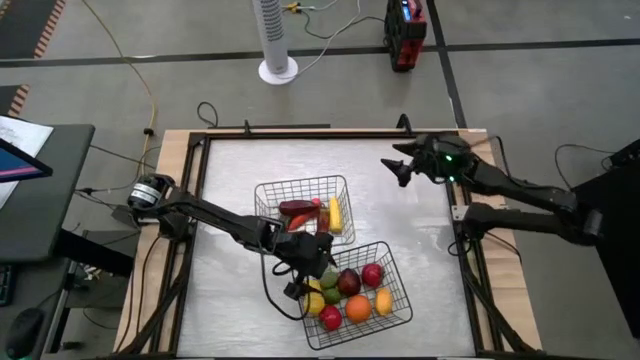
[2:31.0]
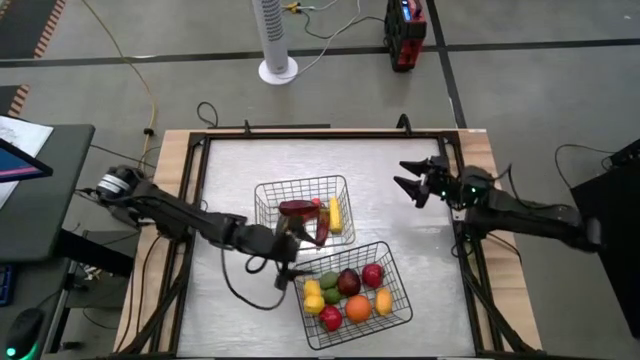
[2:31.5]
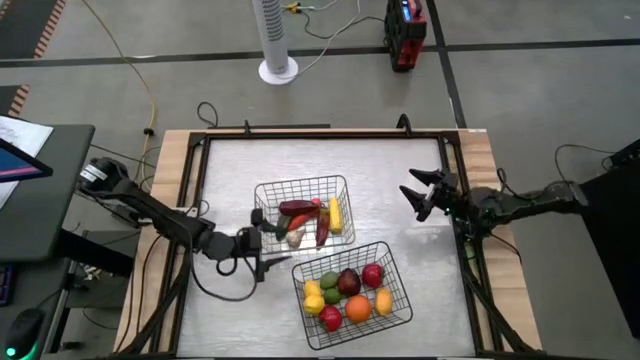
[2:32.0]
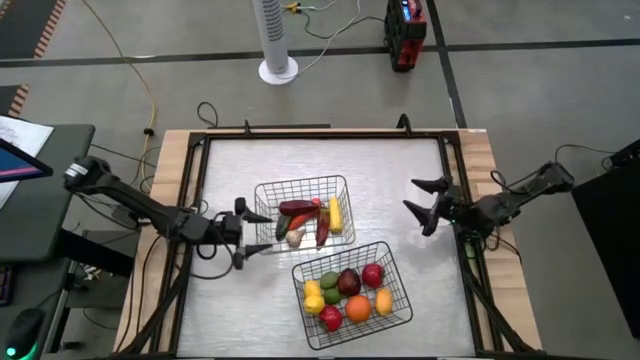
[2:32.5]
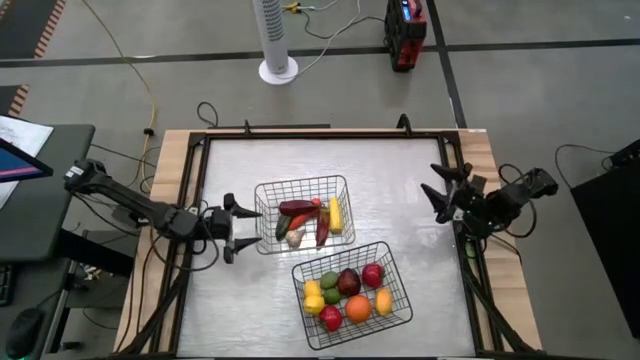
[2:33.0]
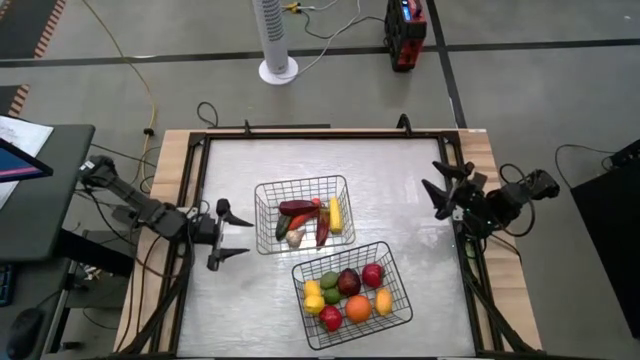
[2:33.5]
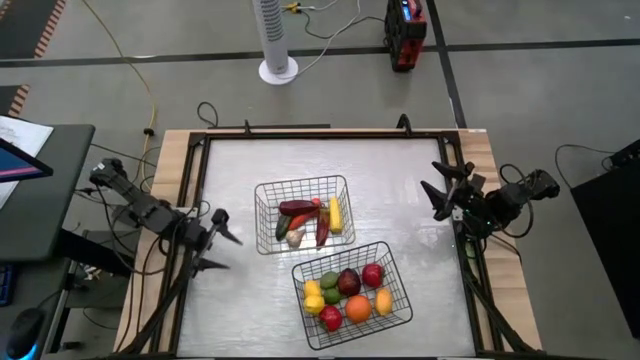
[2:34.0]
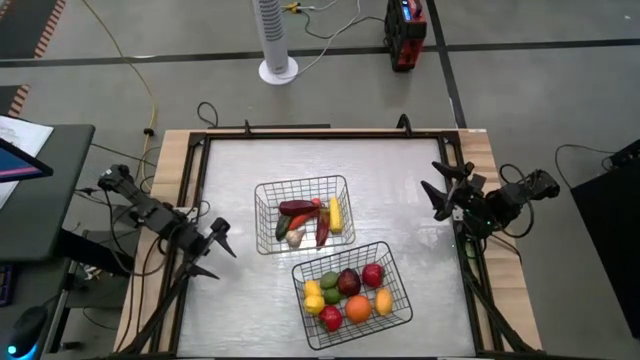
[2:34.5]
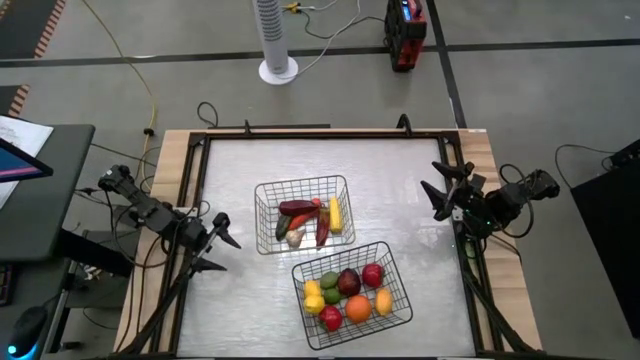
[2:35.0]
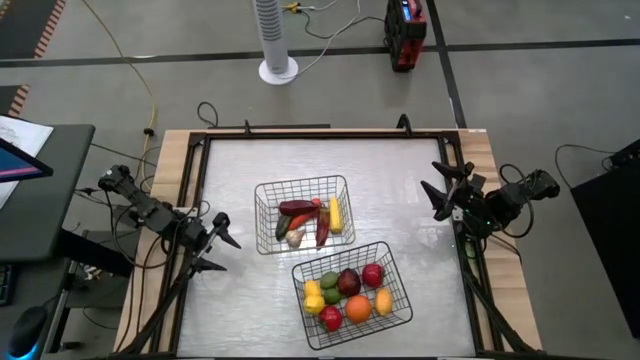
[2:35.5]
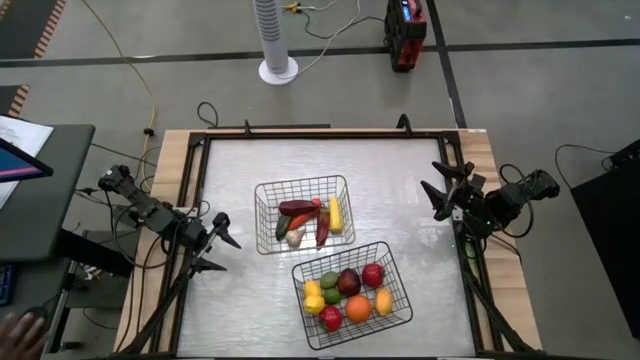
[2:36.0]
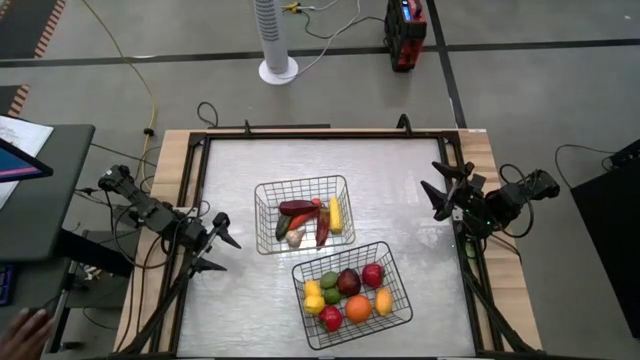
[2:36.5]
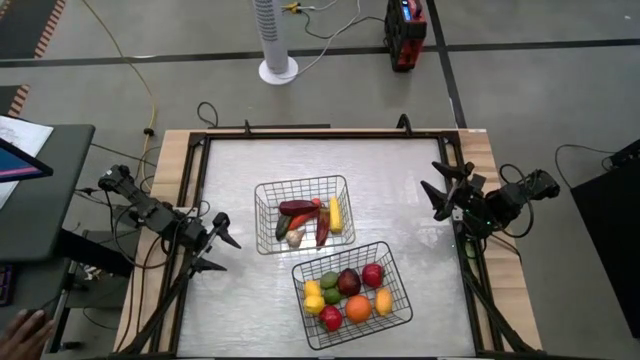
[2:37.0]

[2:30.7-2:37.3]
Task: Sort produce into baskets
Return to Home Position

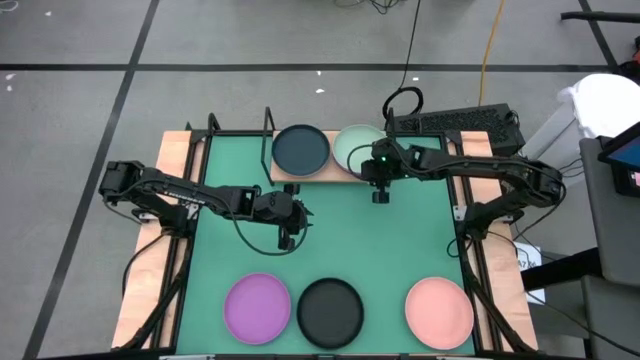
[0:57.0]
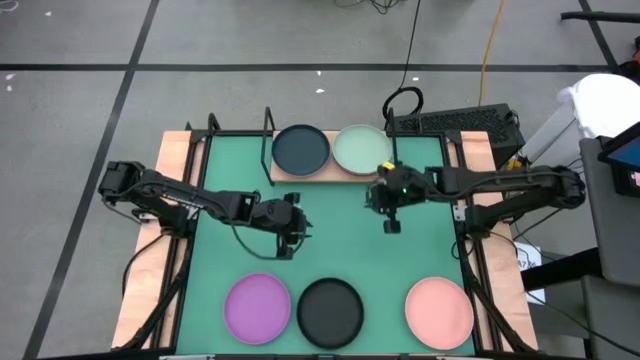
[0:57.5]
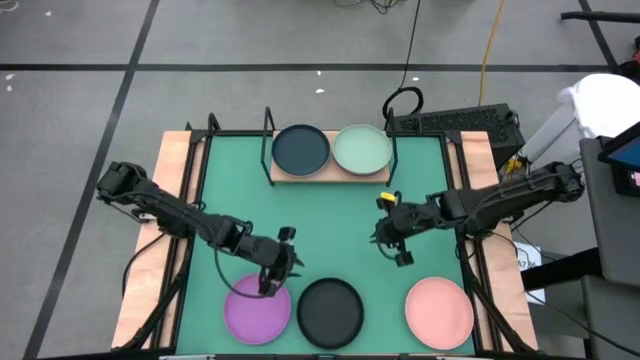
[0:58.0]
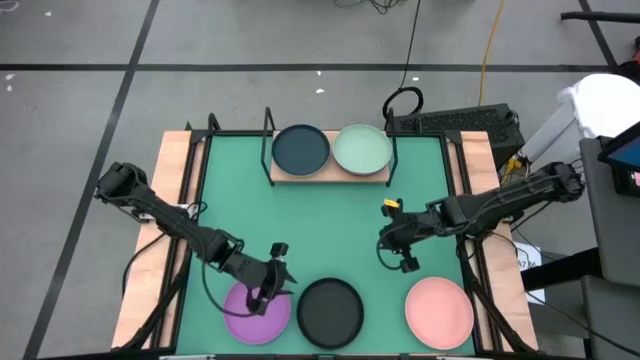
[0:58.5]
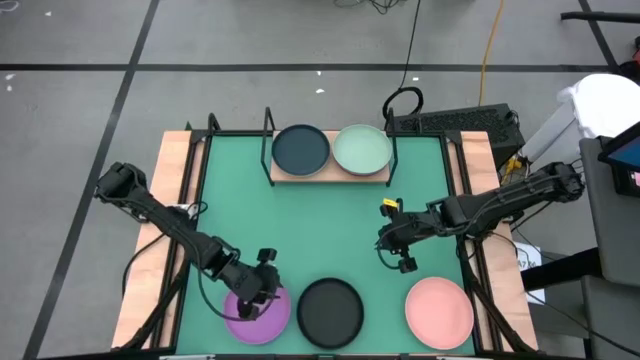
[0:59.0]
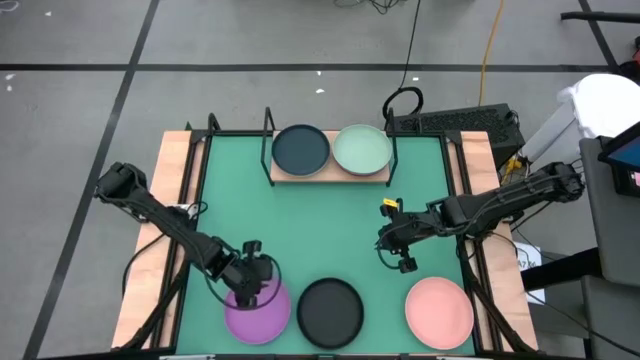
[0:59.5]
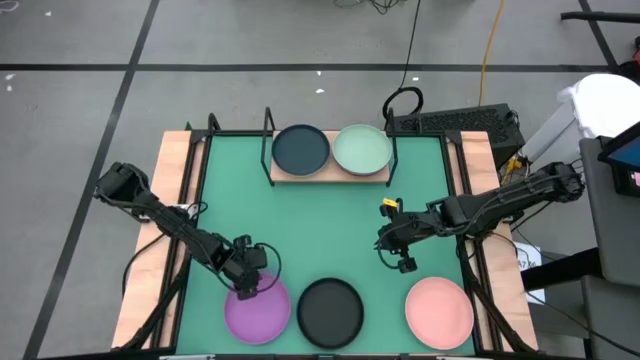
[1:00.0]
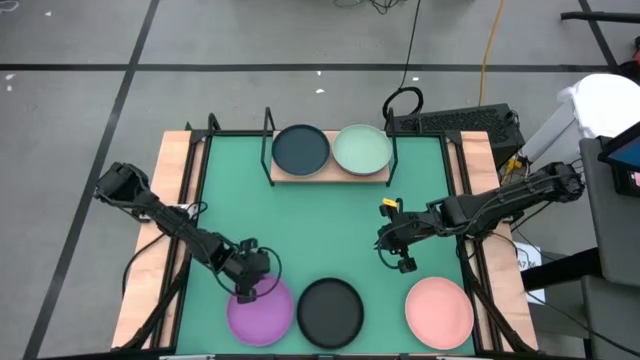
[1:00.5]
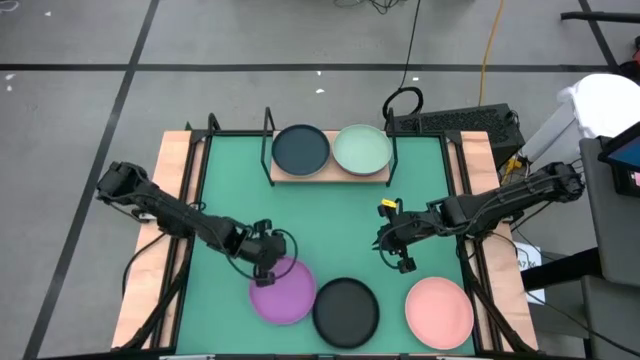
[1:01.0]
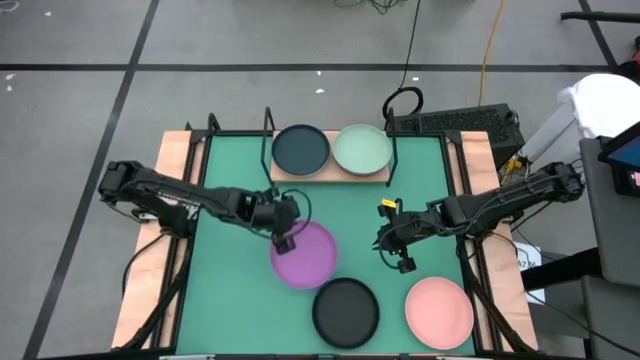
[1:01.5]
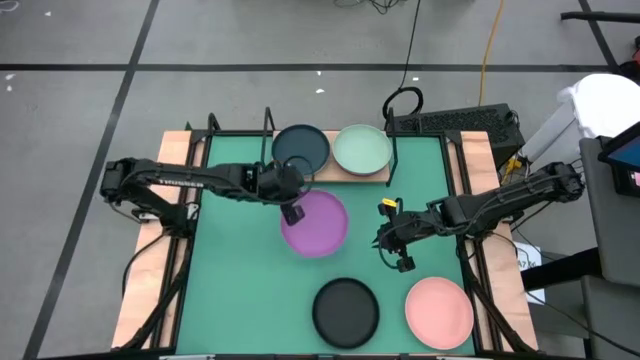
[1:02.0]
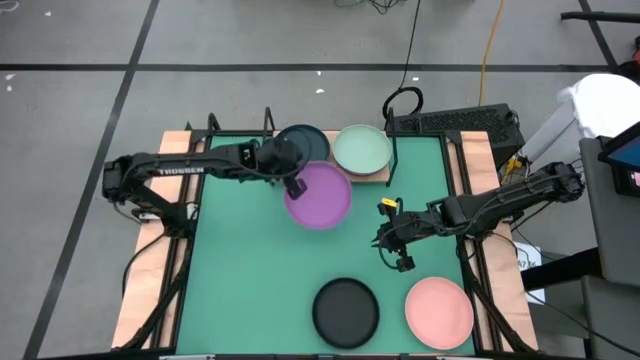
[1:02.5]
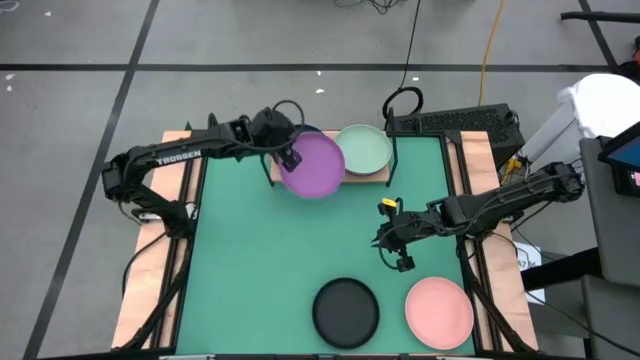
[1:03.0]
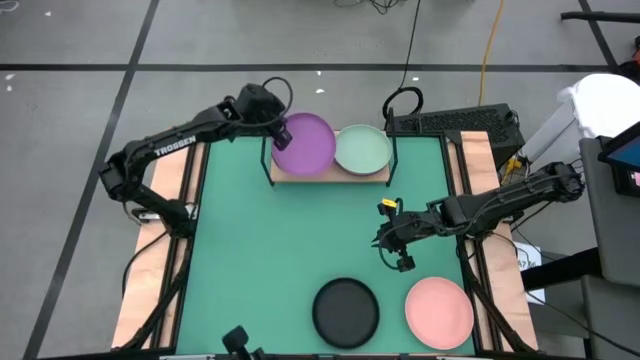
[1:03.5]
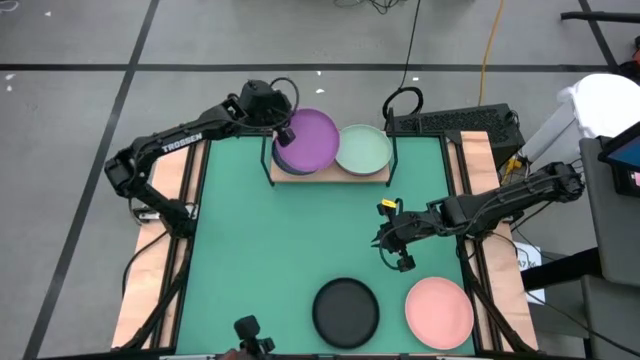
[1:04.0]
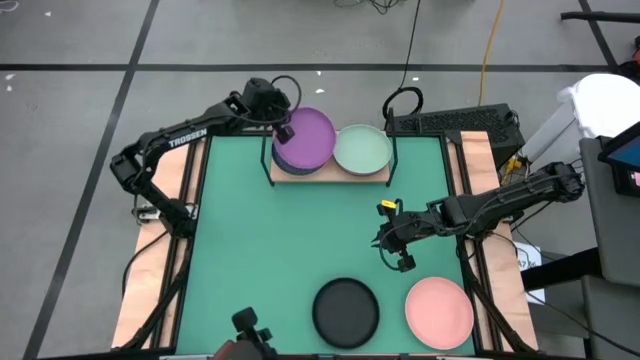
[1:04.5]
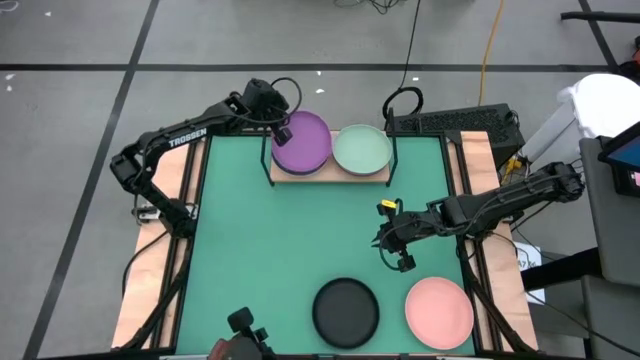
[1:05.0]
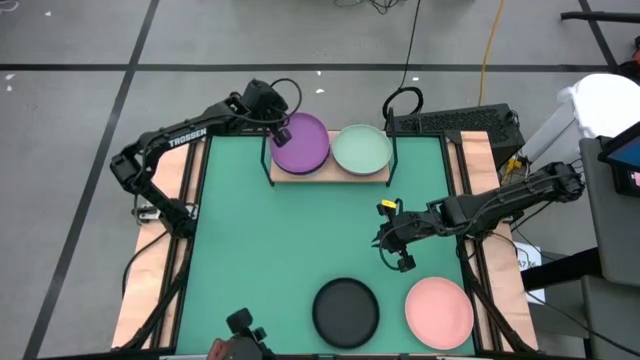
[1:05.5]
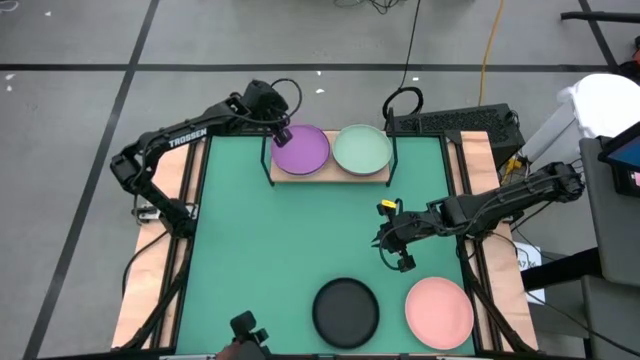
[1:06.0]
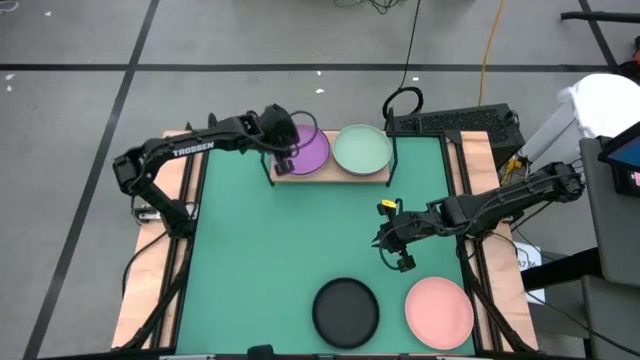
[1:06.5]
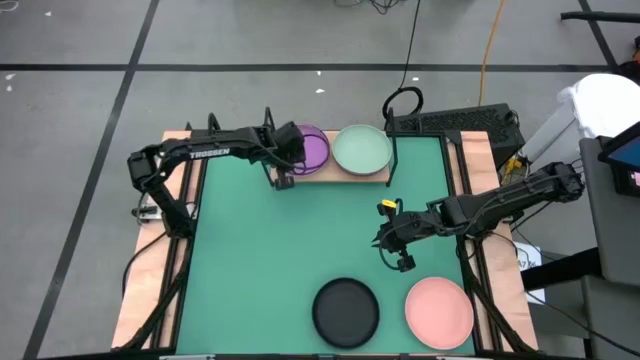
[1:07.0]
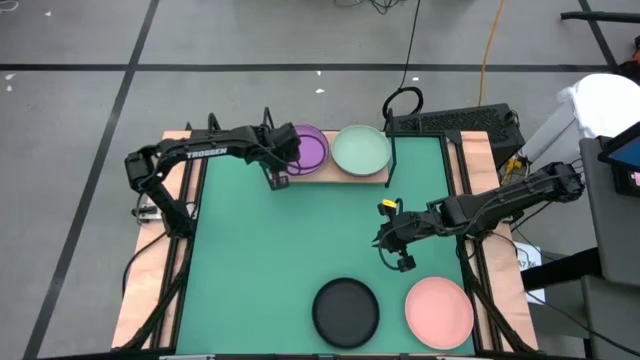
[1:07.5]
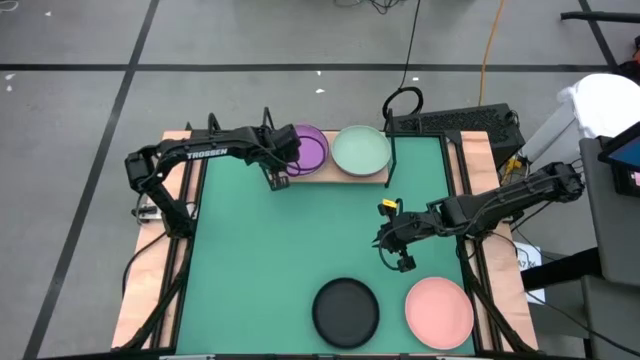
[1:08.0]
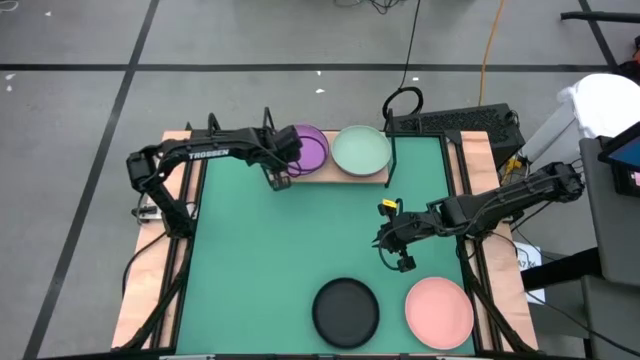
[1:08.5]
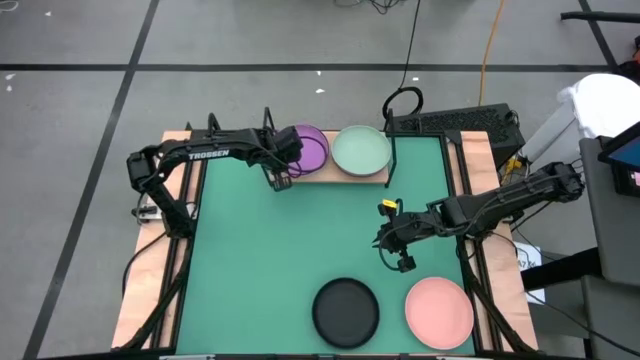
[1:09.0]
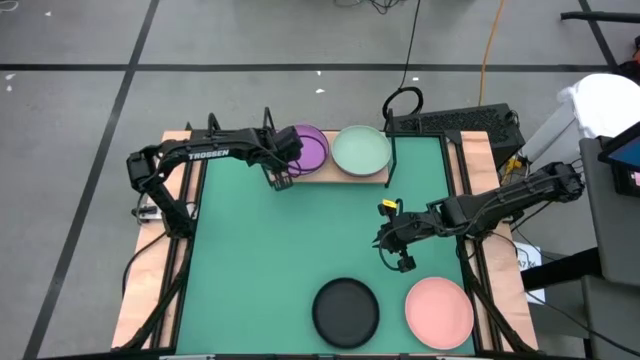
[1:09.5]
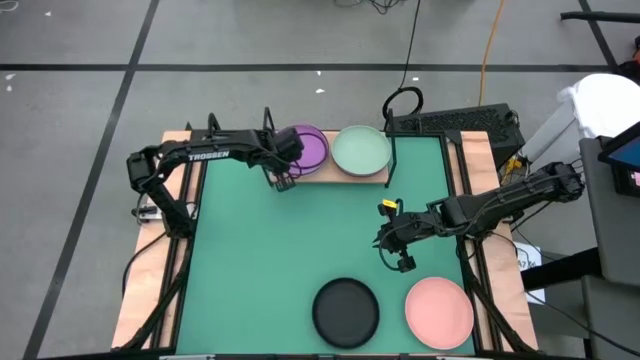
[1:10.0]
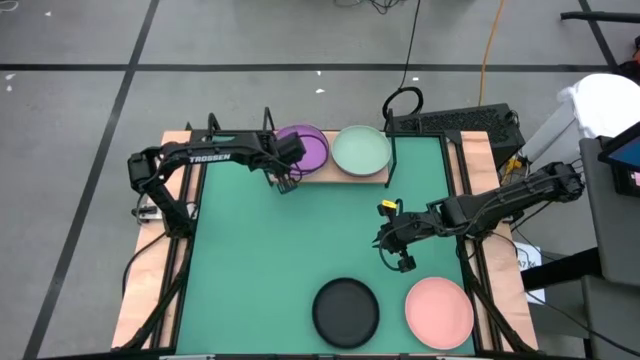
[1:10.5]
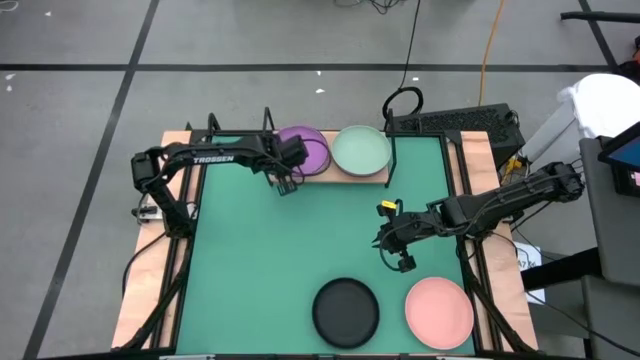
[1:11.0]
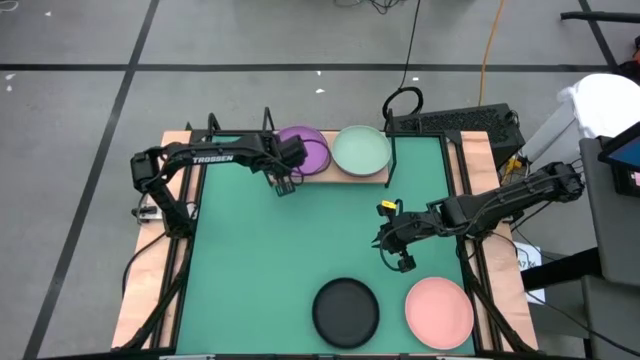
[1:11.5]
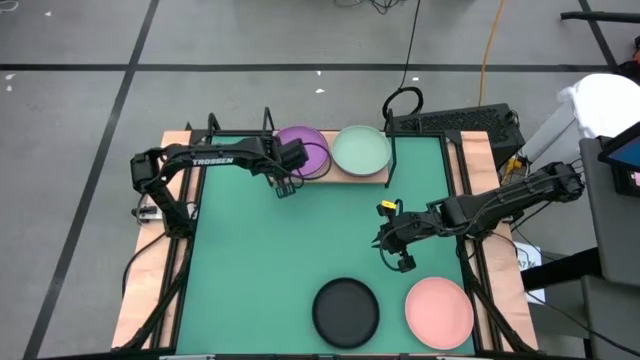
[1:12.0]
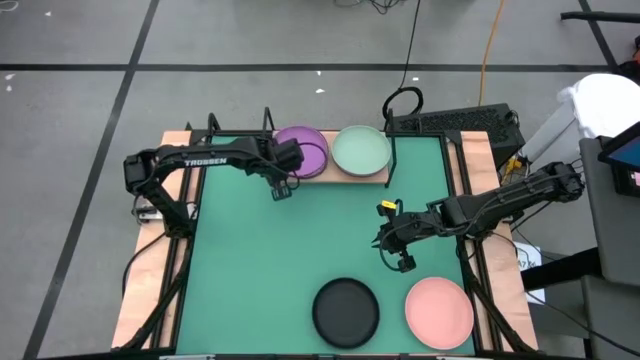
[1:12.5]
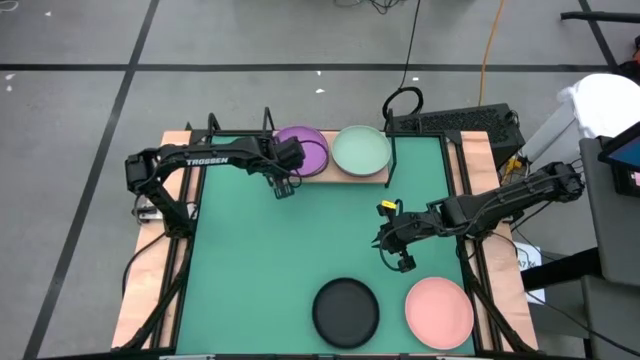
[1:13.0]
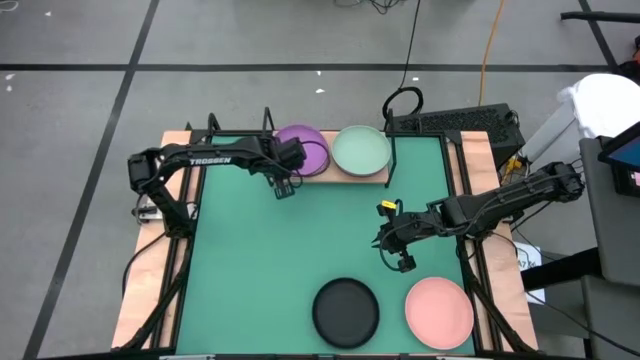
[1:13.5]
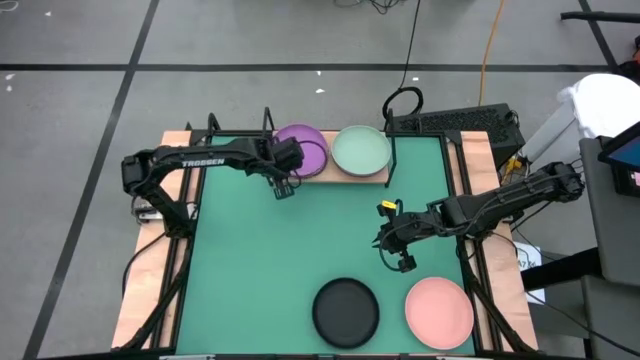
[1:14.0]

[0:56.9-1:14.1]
Task: Place and stack plates onto a shelf
Stack the purple plate on top of the dark blue plate on the shelf
